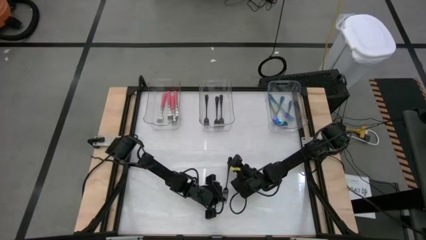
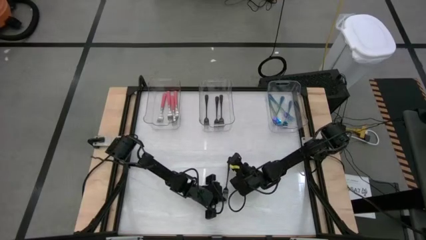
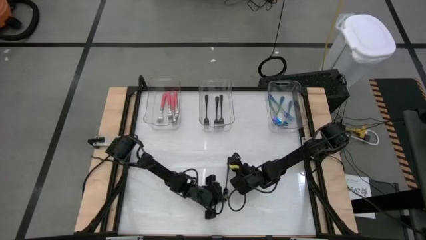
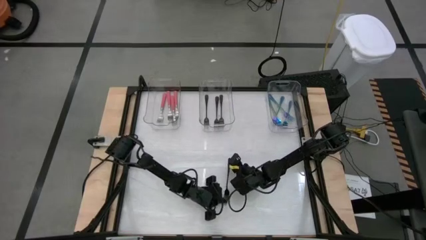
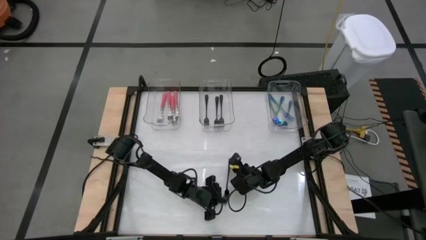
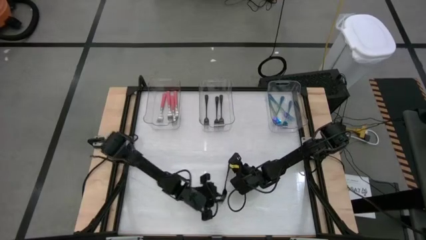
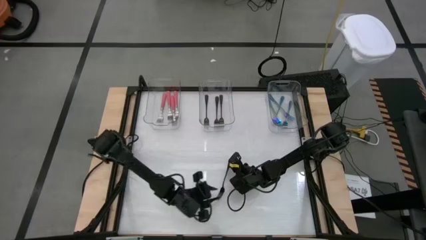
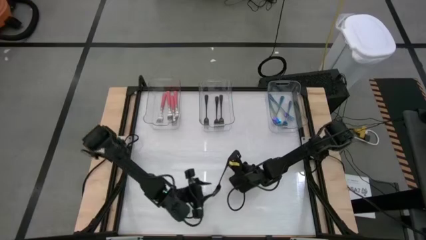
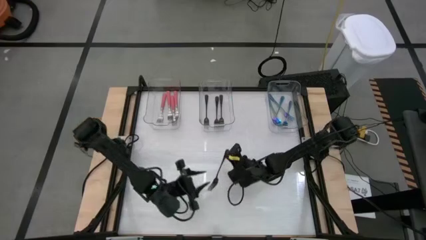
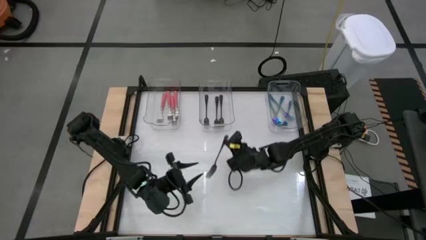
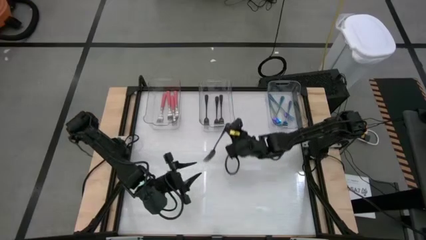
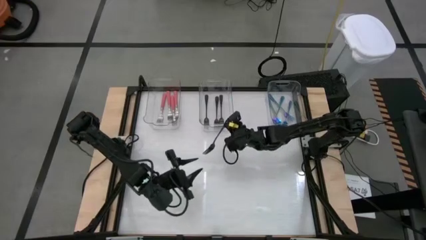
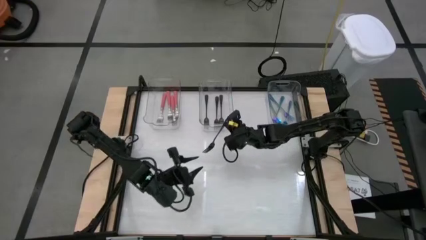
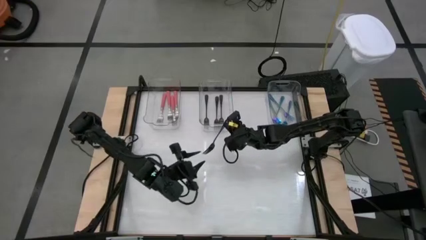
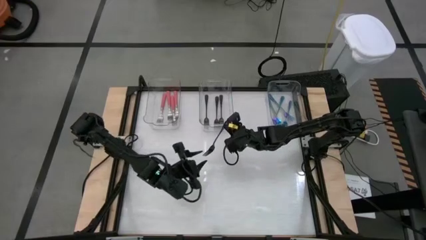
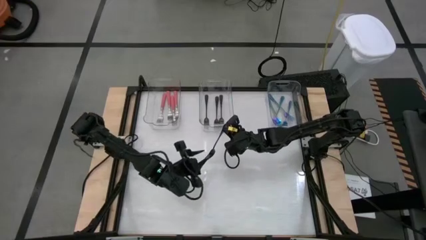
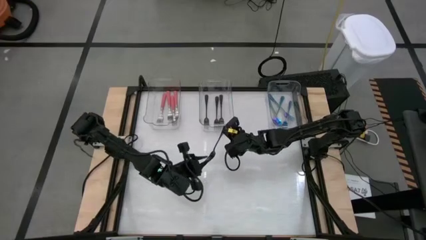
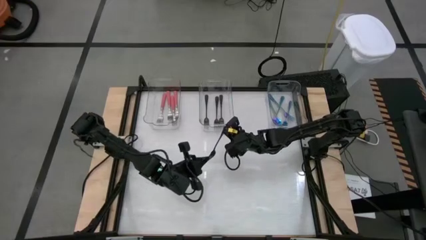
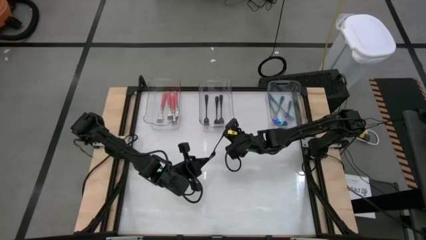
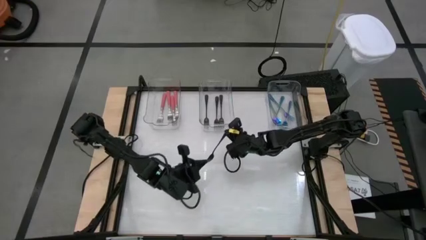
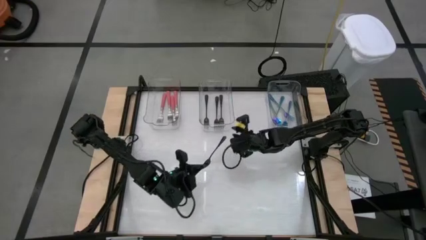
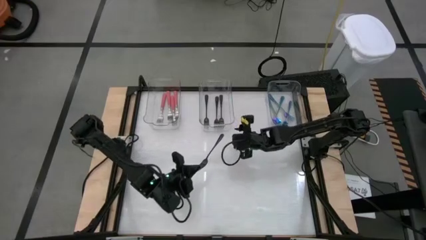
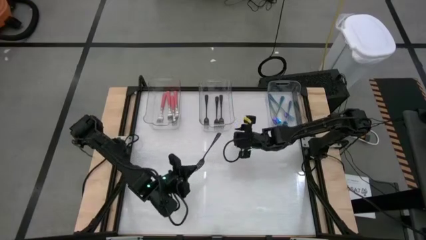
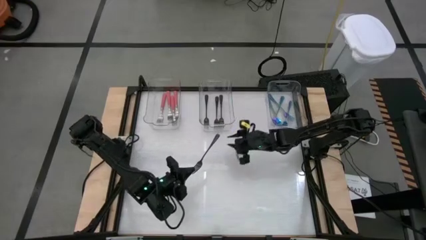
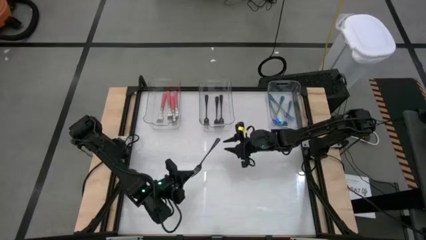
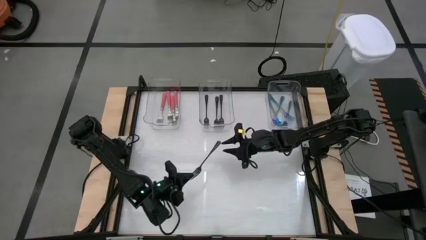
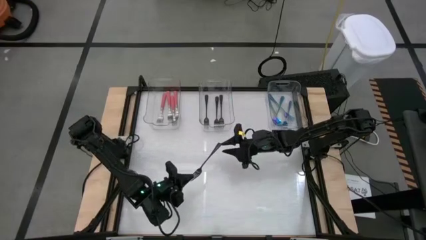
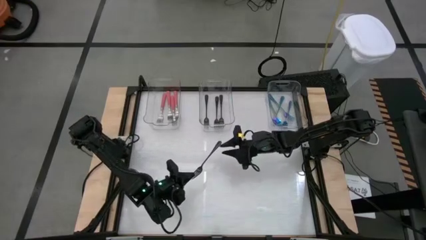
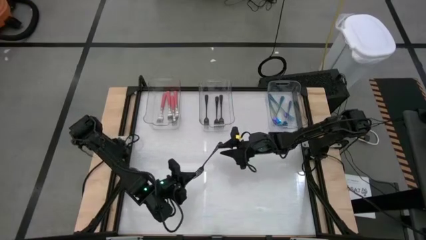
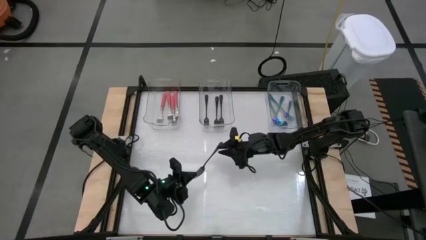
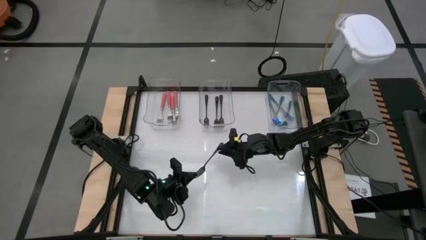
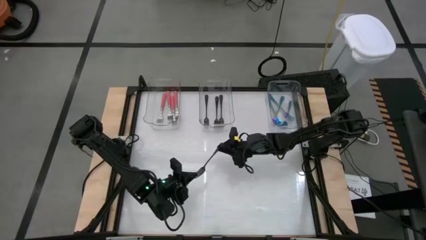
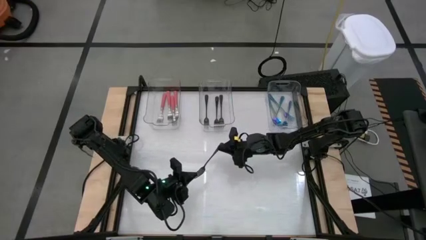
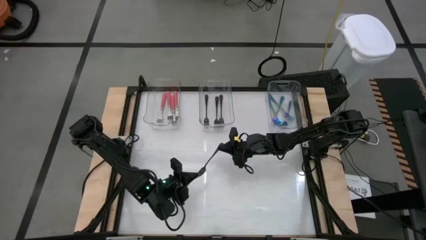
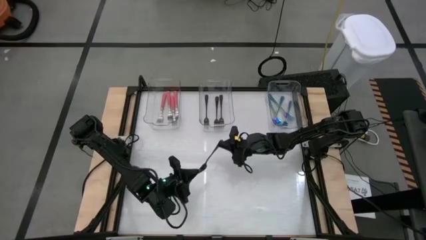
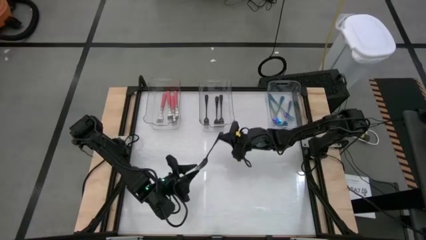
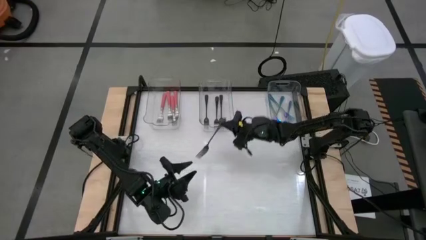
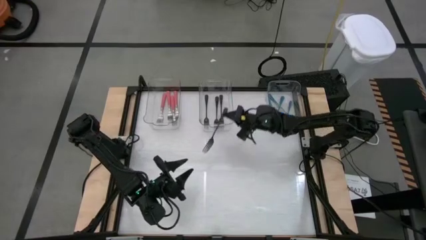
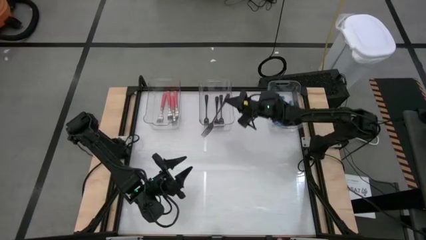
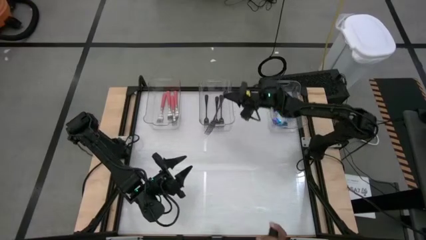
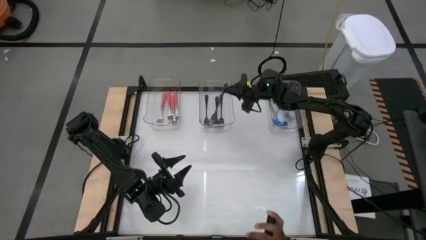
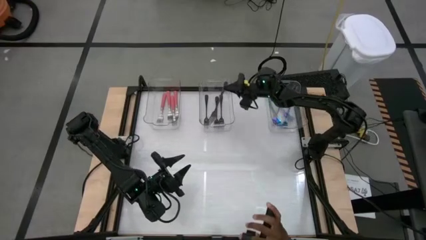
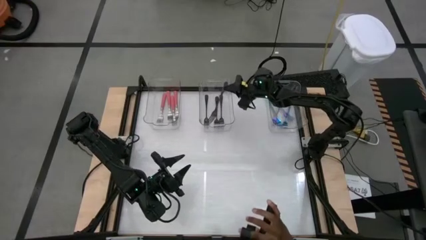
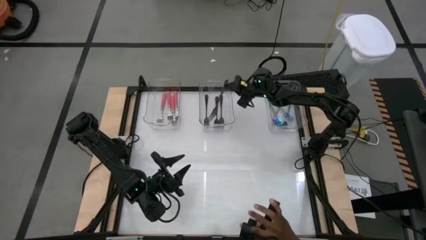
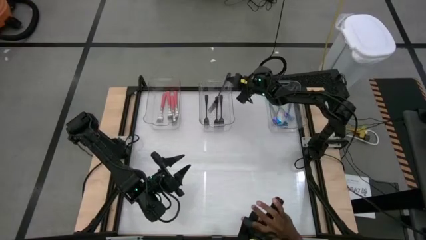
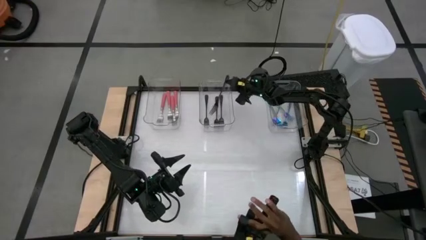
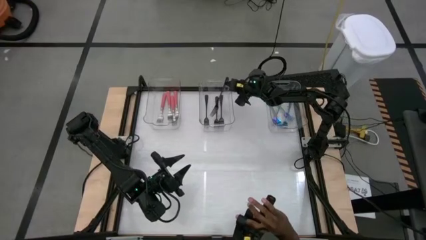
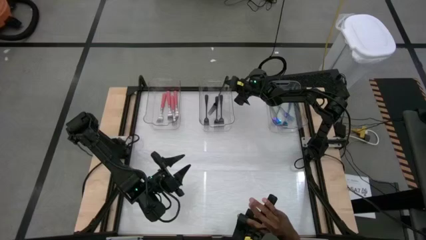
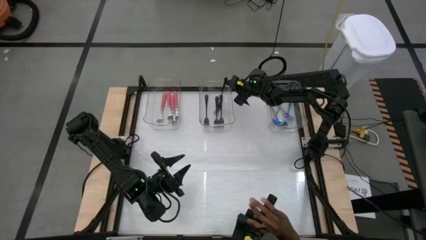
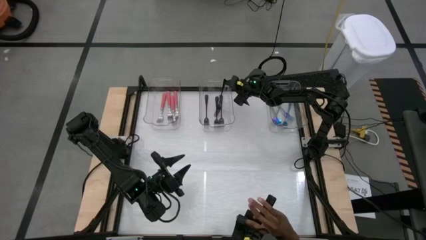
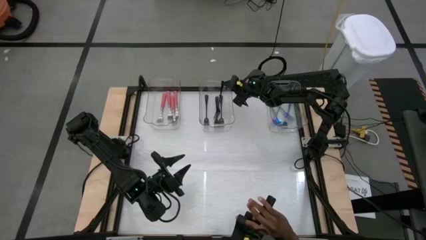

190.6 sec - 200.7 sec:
Task: Sort silverware by color (type)
Put the black fork into the middle transparent bin
